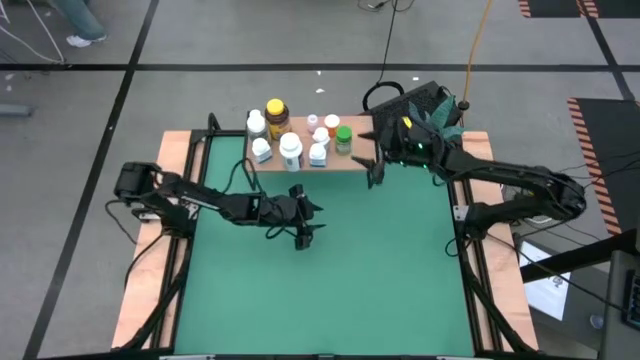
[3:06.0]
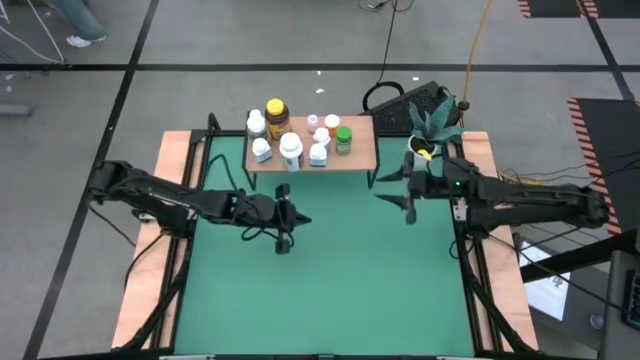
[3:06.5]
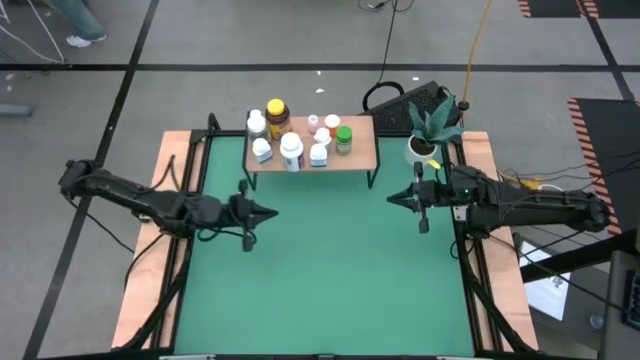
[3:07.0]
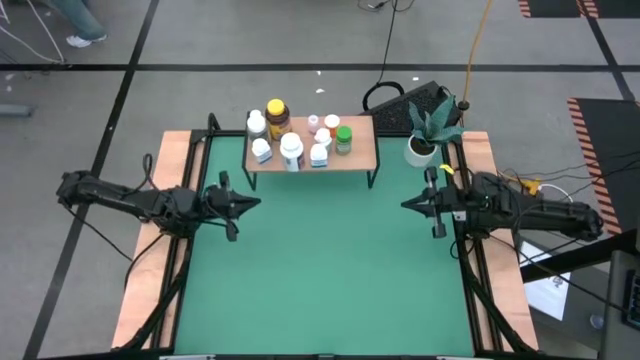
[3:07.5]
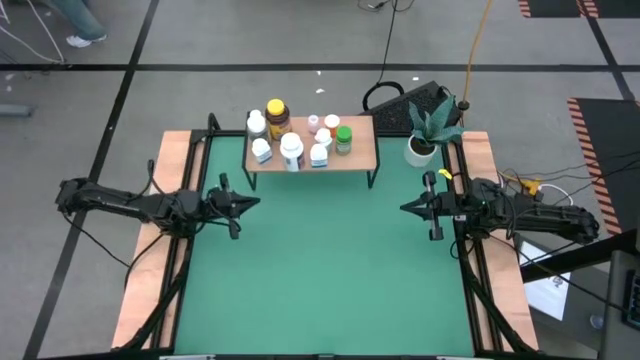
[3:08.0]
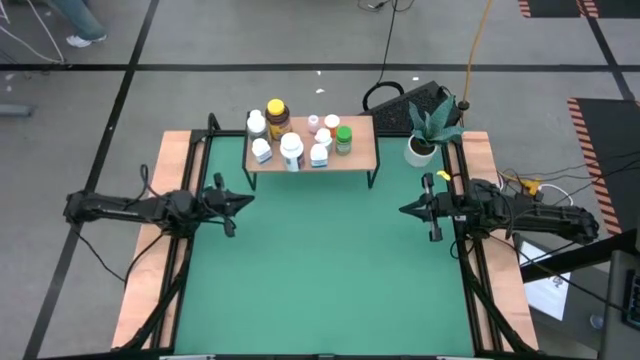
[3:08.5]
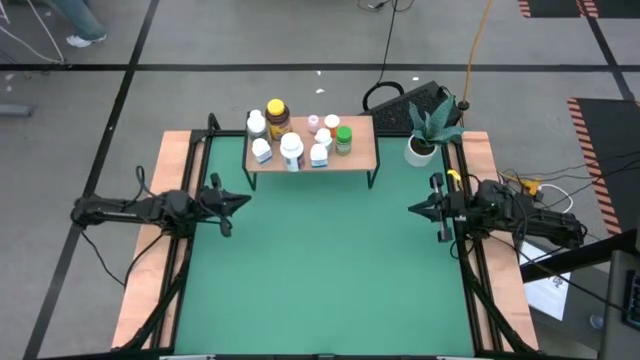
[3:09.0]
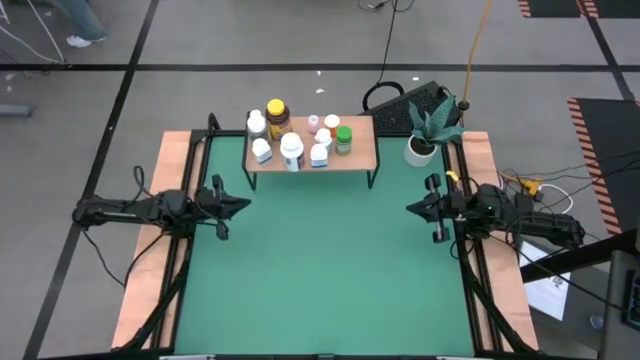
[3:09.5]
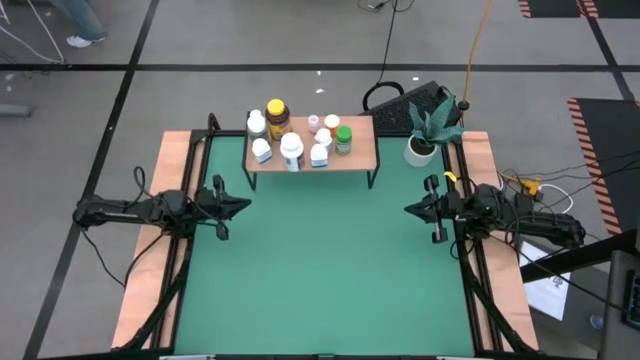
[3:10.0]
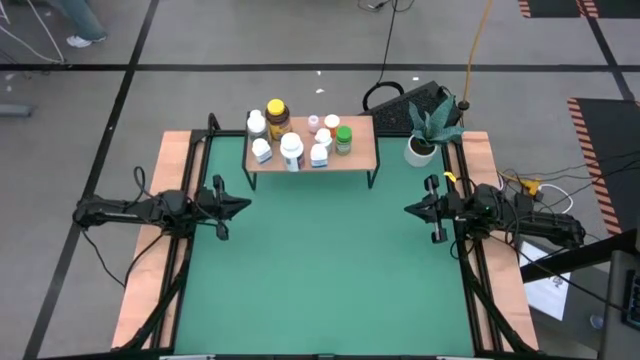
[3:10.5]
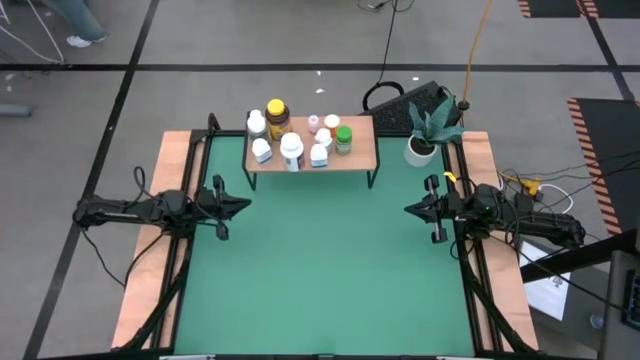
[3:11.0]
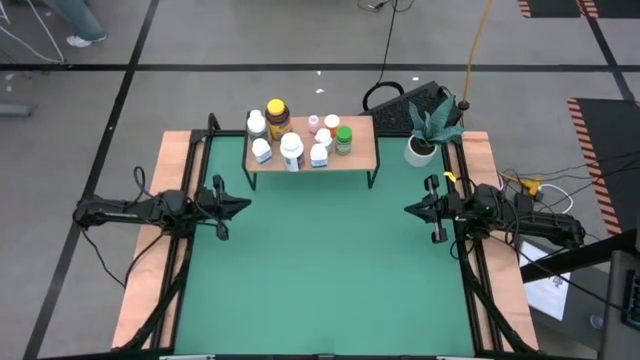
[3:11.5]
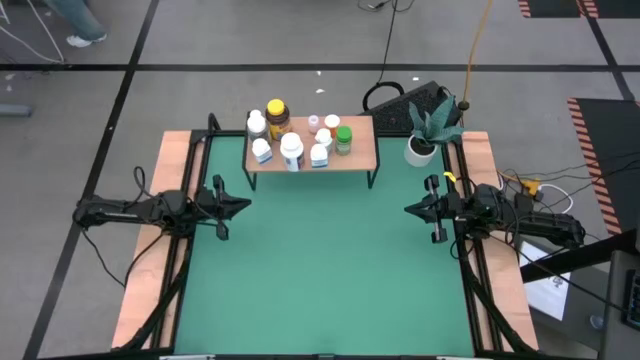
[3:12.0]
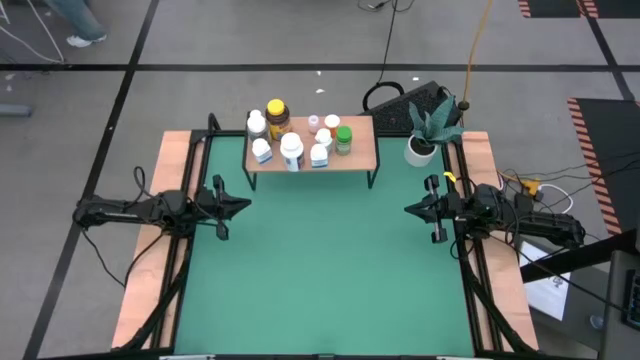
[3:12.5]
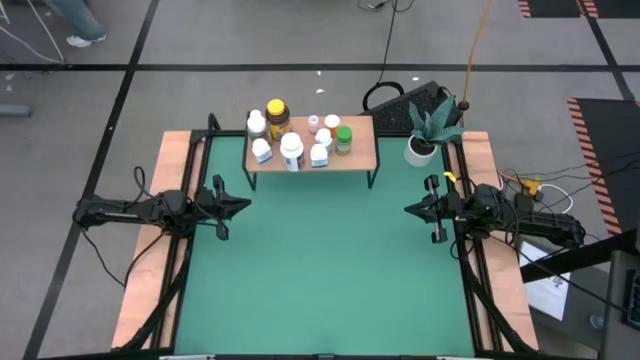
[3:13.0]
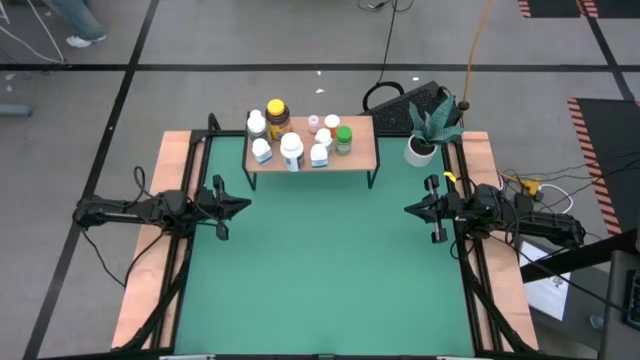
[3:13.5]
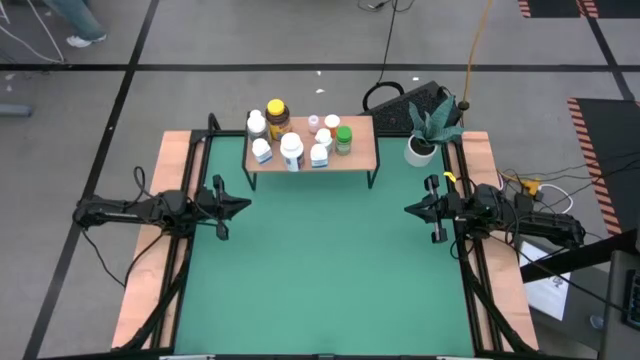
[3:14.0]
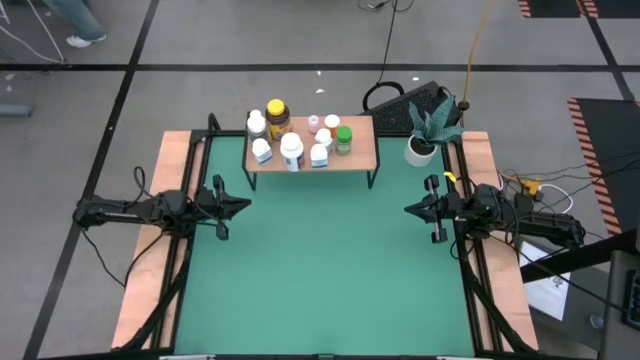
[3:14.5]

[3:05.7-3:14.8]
Task: Pick and place medicine bottles onto shelf by color
Return to Home Position

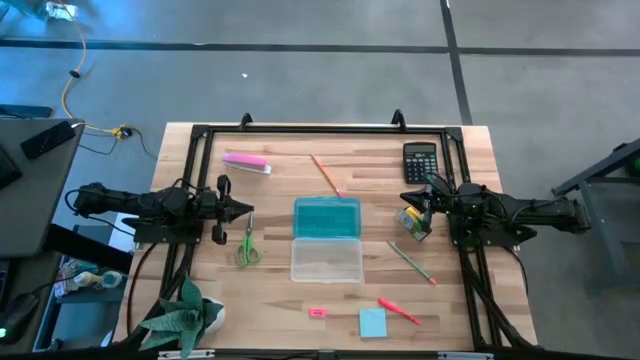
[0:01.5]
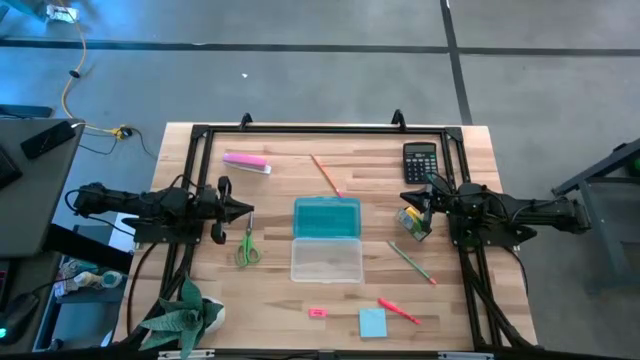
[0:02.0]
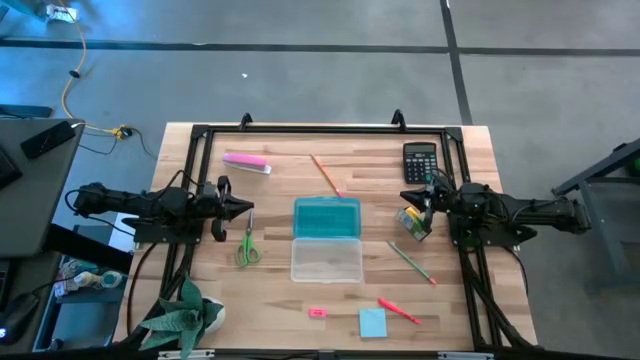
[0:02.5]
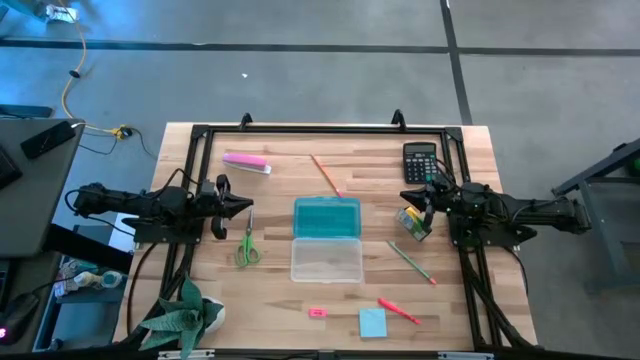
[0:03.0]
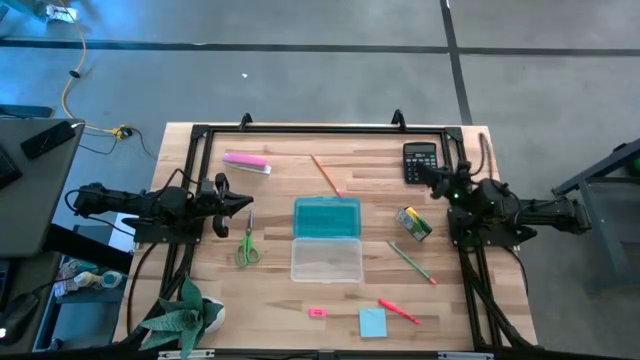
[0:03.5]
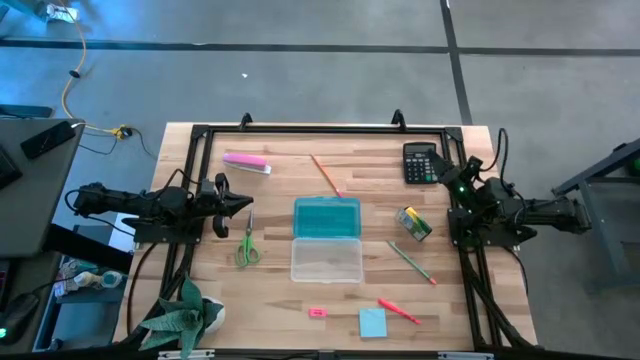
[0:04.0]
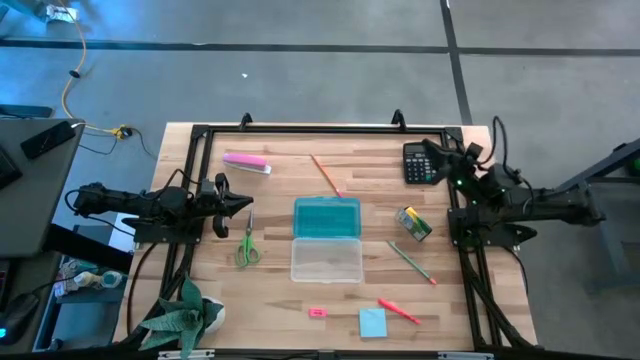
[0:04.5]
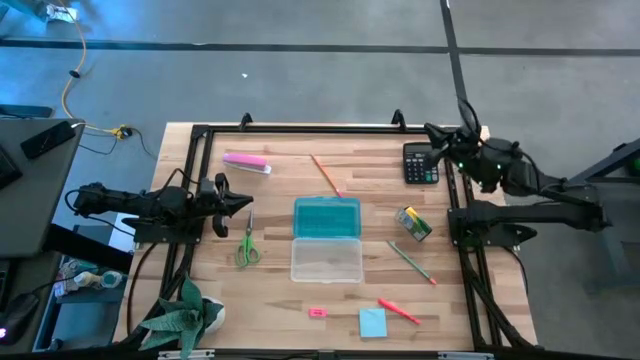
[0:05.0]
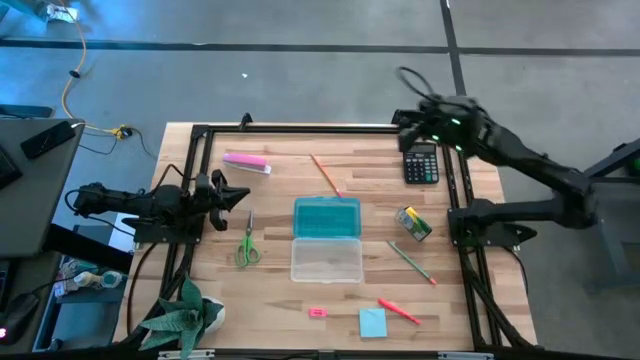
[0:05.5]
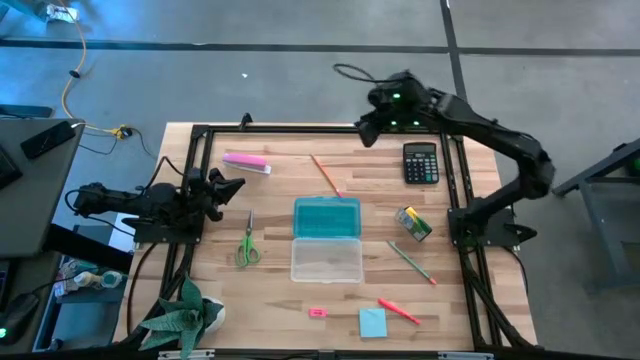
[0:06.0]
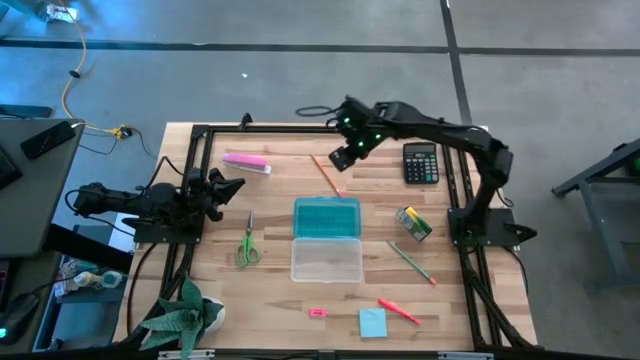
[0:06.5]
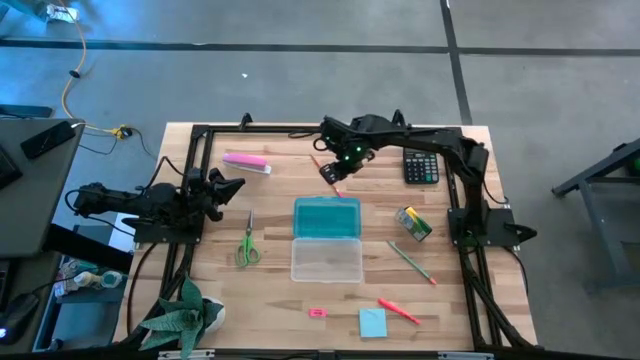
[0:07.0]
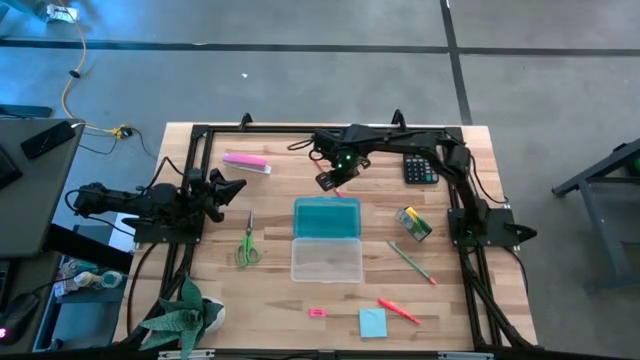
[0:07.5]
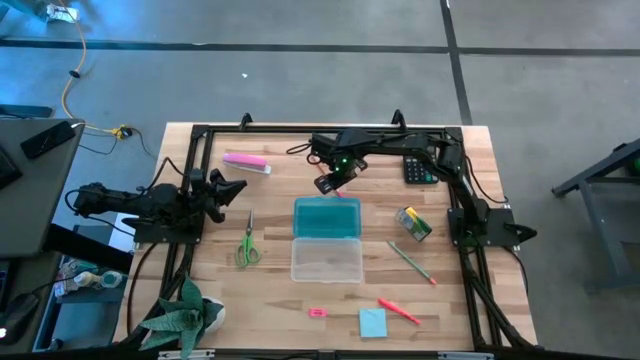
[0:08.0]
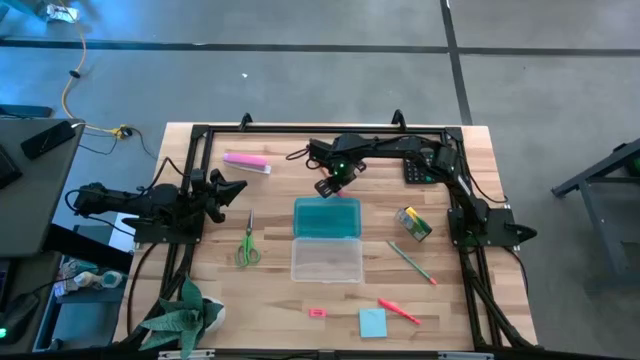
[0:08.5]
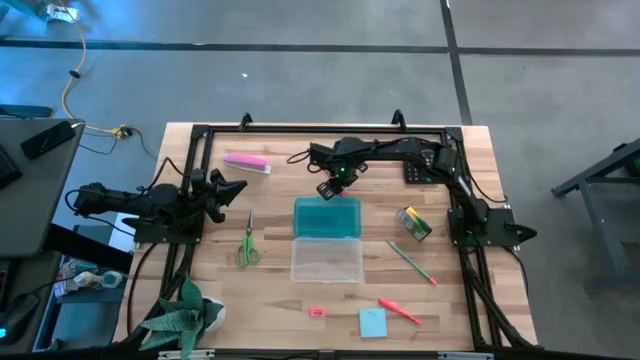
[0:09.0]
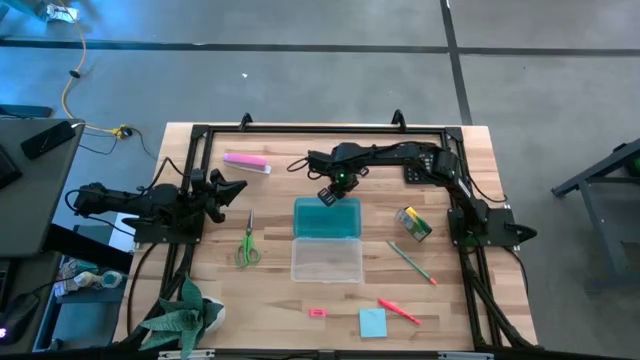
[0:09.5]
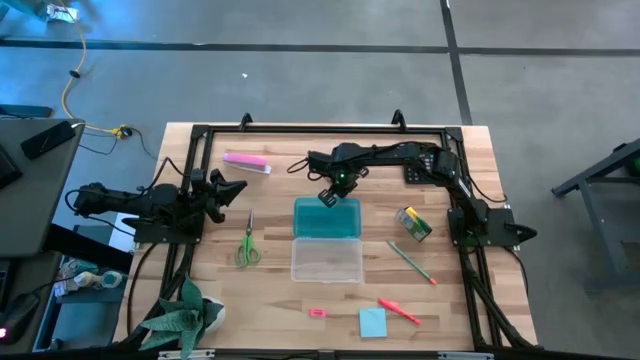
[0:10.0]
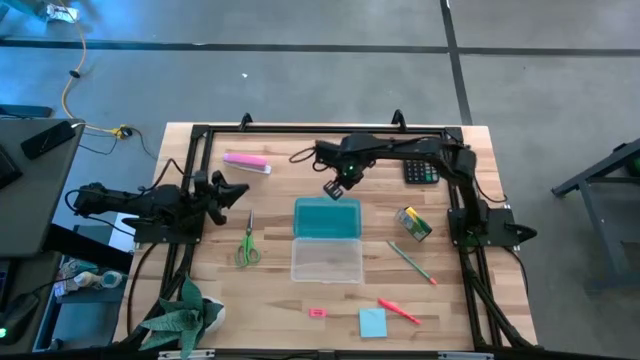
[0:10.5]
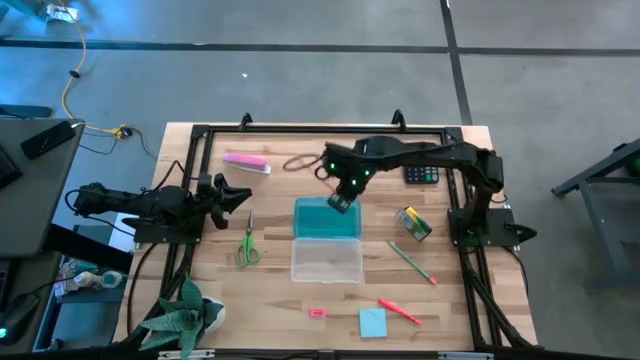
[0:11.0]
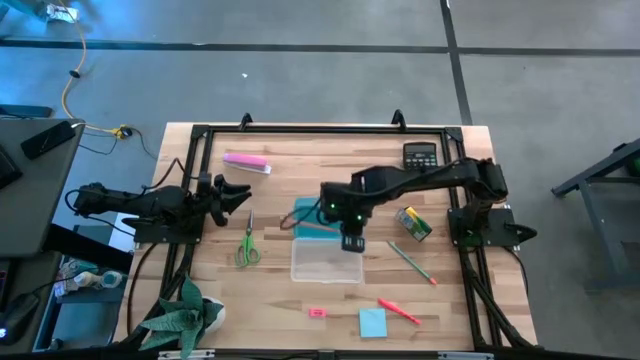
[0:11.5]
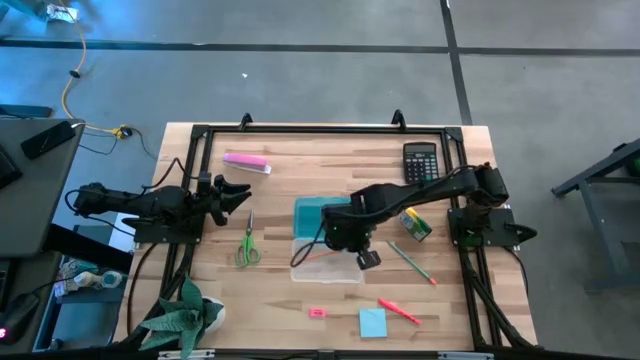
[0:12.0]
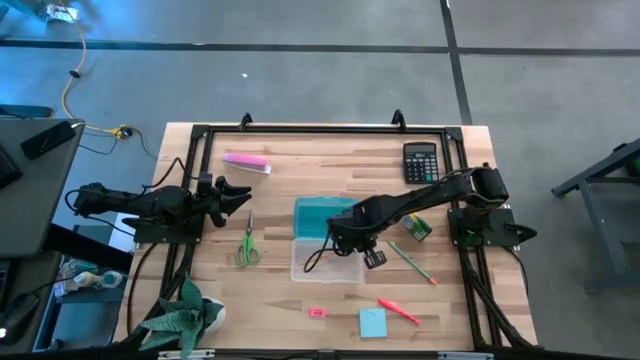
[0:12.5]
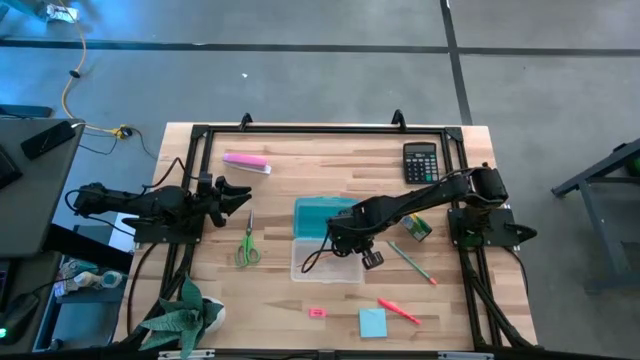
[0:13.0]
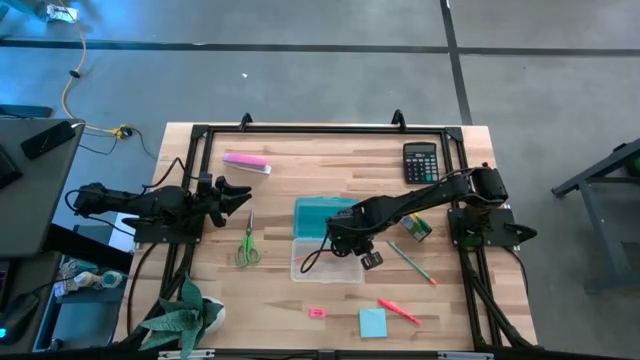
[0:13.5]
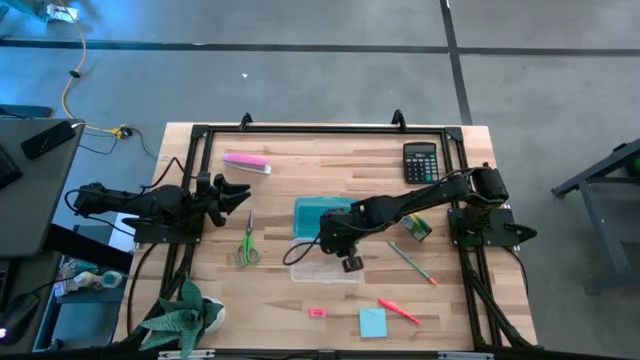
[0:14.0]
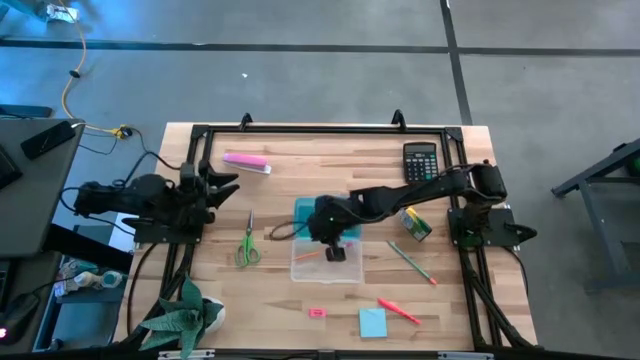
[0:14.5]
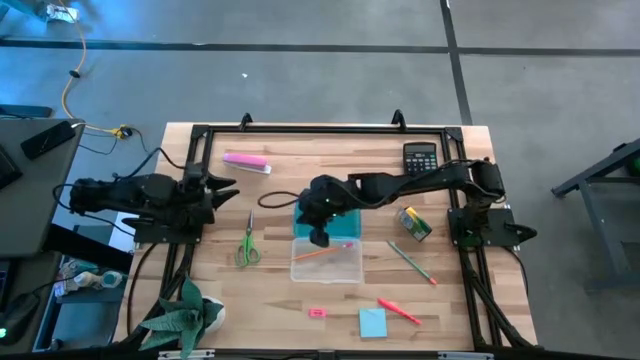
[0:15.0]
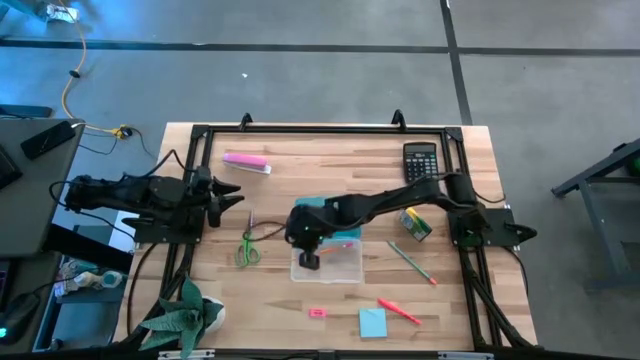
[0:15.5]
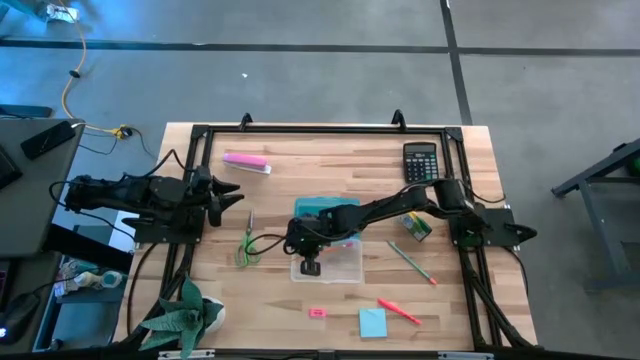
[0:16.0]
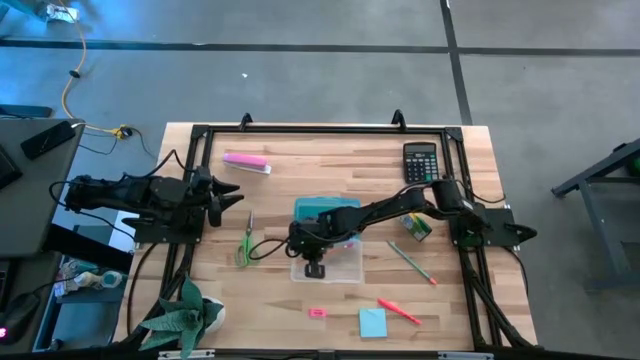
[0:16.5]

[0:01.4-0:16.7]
Task: Pack school essentials
Put the yellow pencil into the supply box
